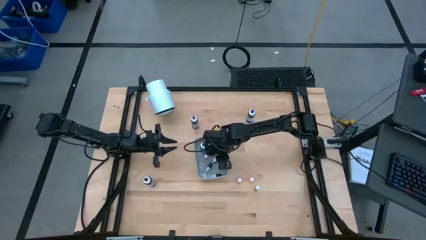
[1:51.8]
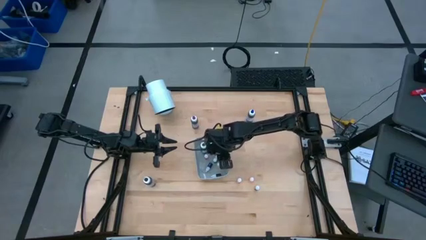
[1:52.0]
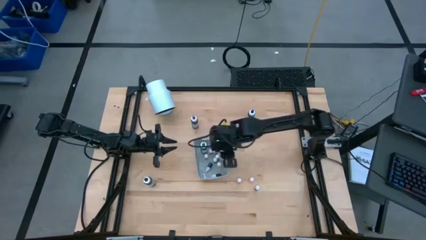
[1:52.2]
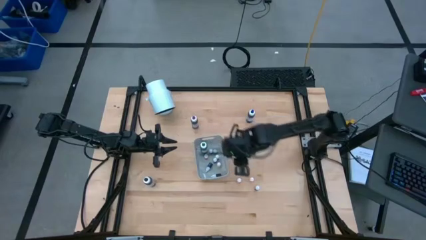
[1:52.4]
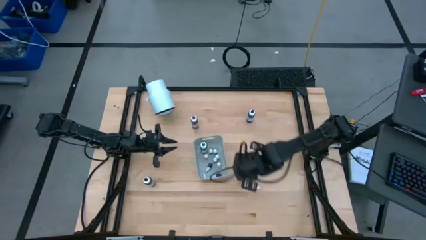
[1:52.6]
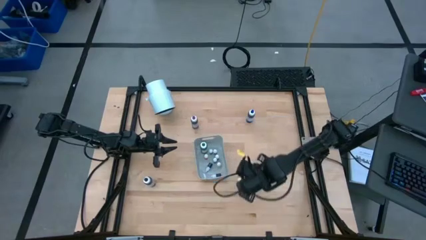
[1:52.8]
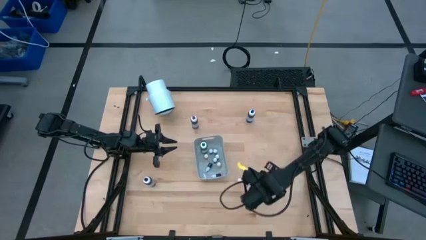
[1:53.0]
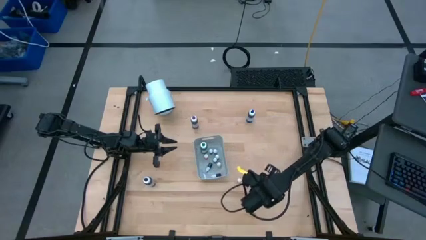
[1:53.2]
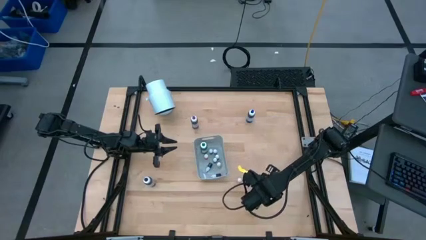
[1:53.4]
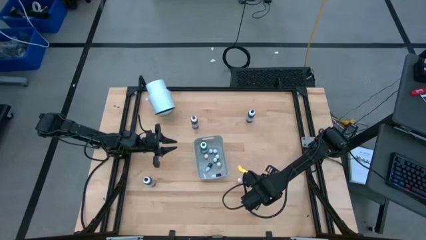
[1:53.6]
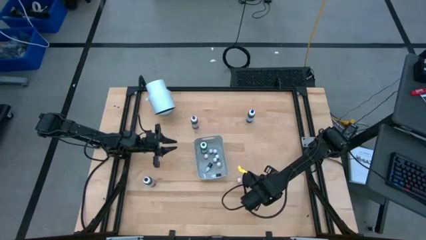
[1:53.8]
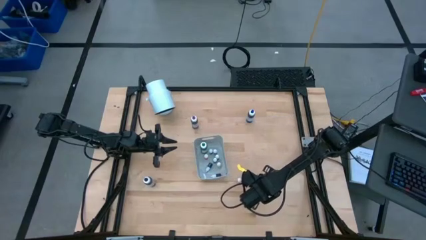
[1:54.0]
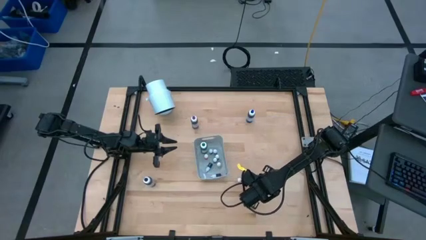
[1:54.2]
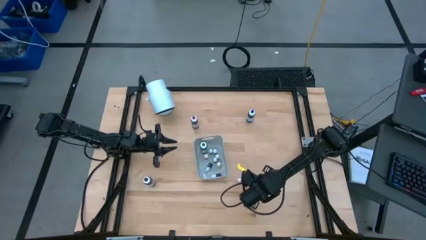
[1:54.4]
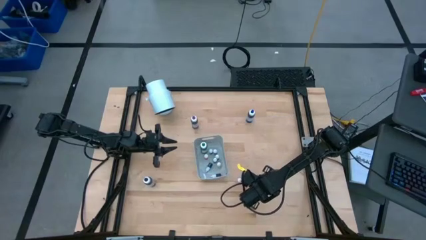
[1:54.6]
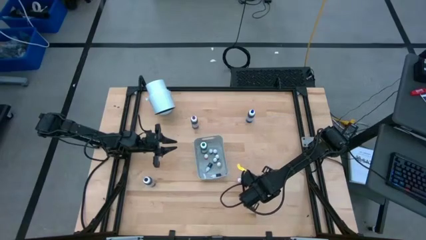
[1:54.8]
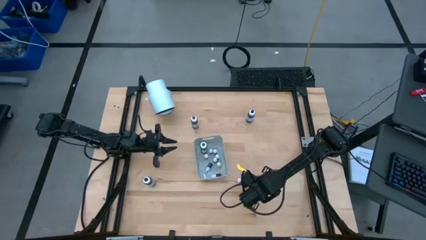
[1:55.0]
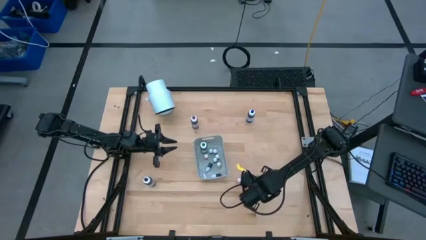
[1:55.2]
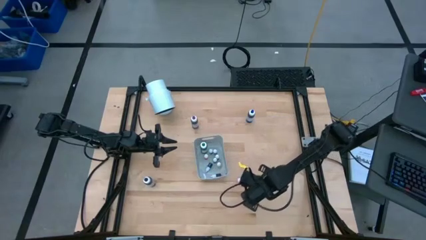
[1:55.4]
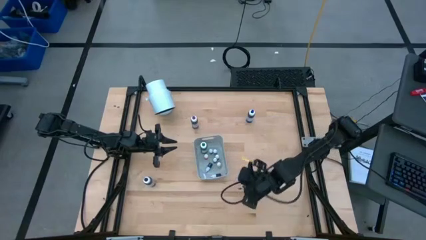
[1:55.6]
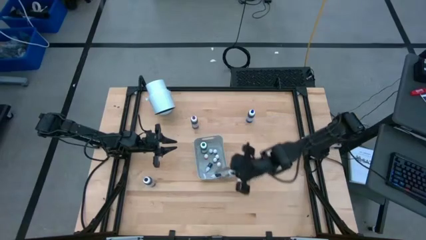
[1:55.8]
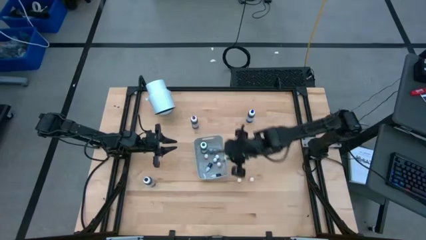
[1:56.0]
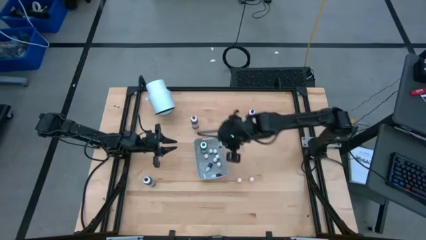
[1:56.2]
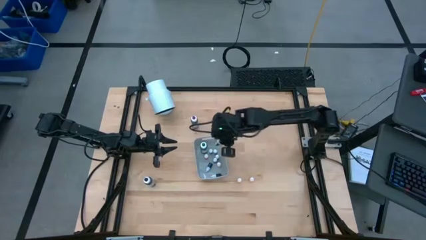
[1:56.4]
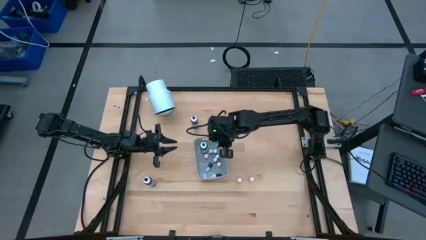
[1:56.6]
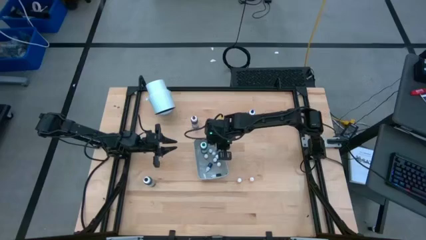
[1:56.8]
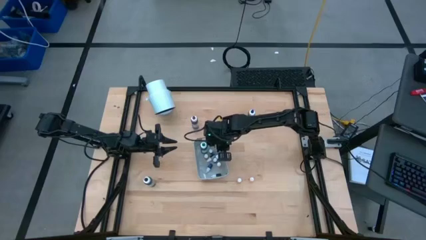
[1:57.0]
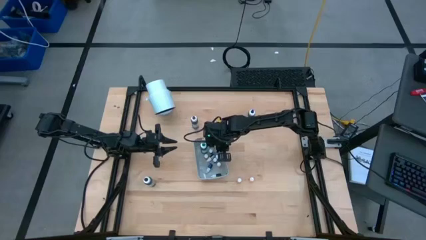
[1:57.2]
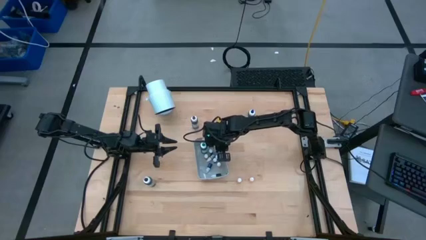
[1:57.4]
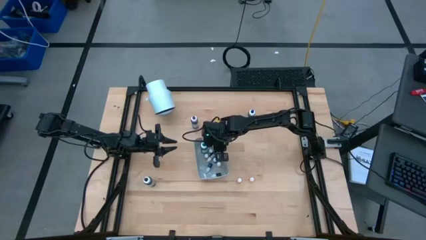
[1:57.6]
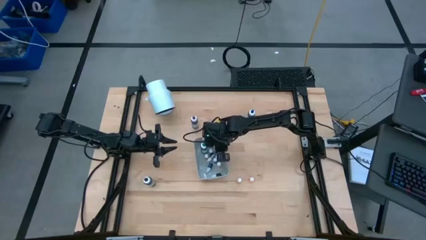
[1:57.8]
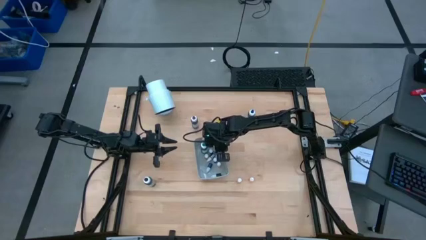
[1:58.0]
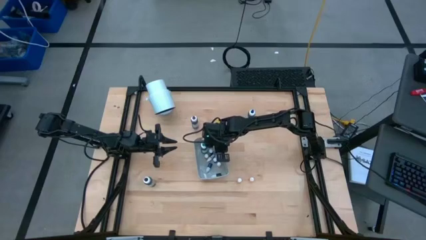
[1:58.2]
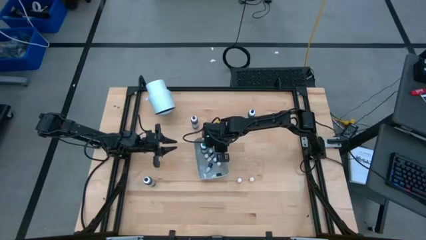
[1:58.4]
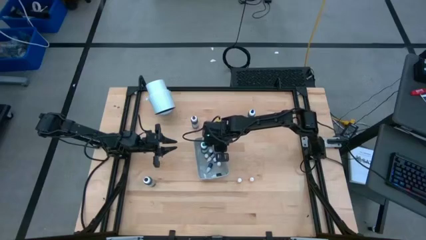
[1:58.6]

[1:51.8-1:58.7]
Task: Pick & Place food coloring
Put the purple food coloring bottle into the bin

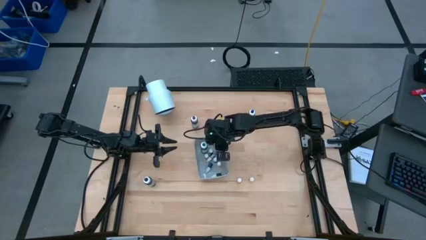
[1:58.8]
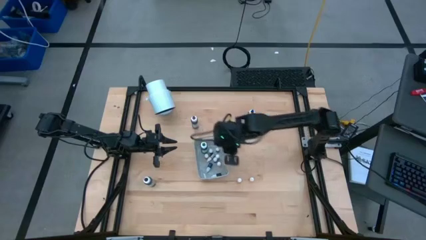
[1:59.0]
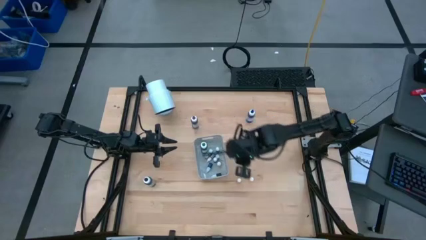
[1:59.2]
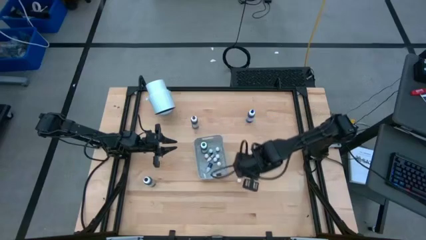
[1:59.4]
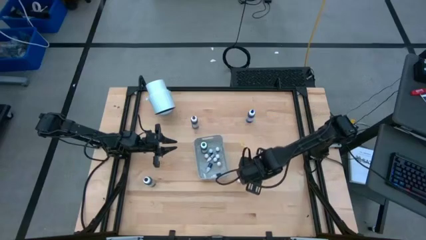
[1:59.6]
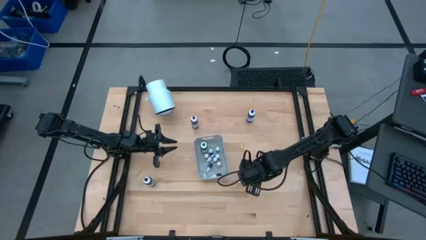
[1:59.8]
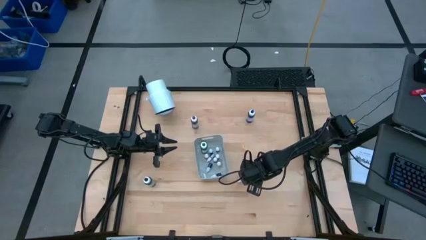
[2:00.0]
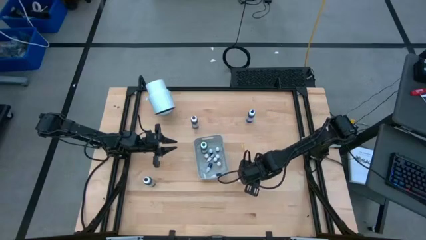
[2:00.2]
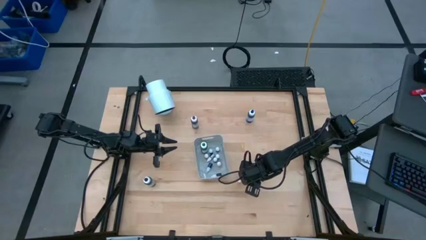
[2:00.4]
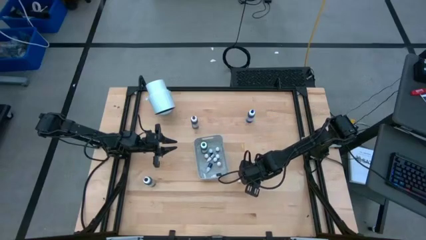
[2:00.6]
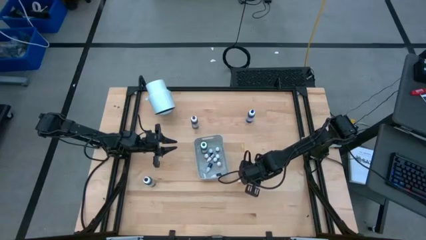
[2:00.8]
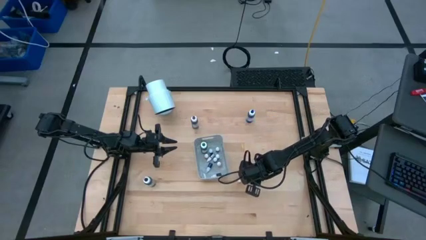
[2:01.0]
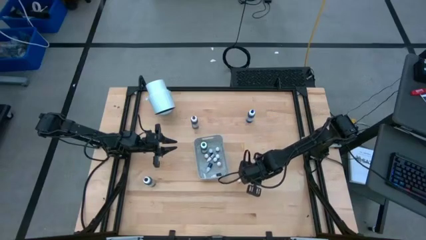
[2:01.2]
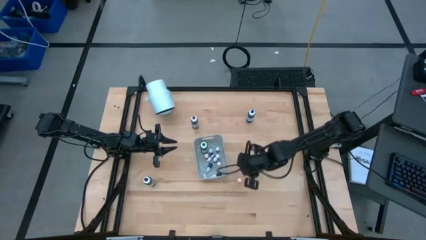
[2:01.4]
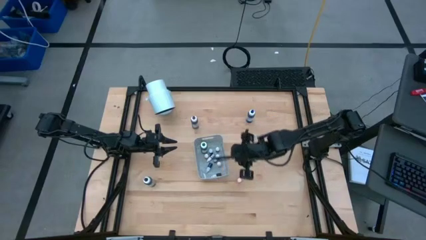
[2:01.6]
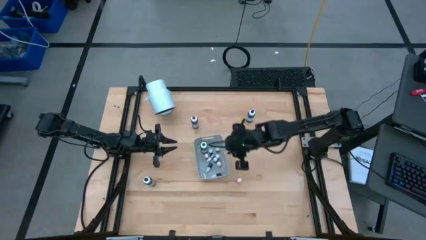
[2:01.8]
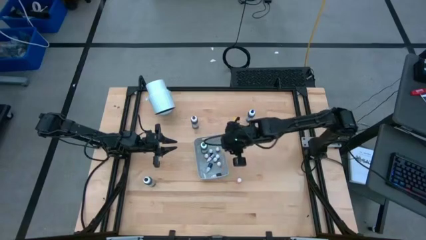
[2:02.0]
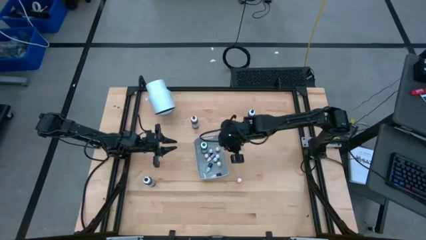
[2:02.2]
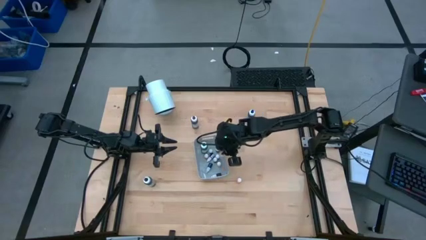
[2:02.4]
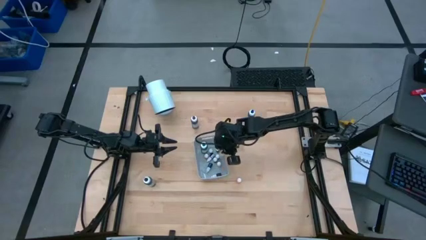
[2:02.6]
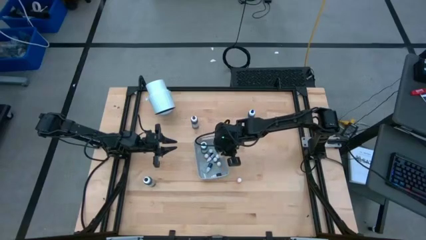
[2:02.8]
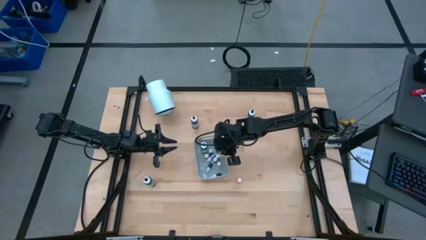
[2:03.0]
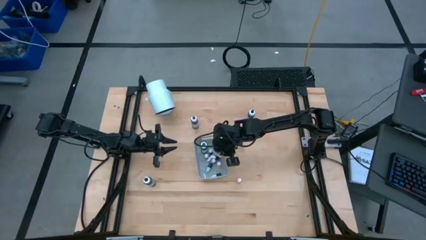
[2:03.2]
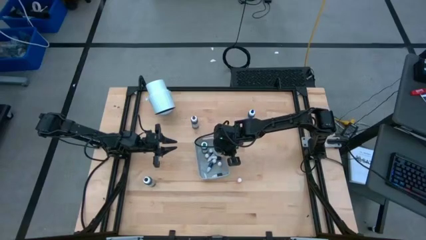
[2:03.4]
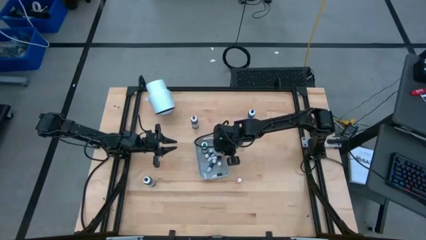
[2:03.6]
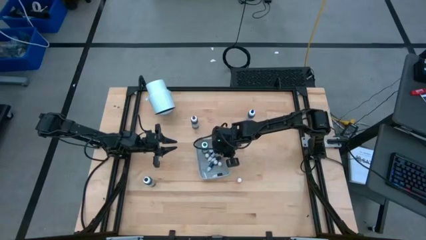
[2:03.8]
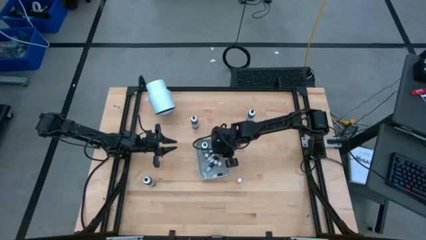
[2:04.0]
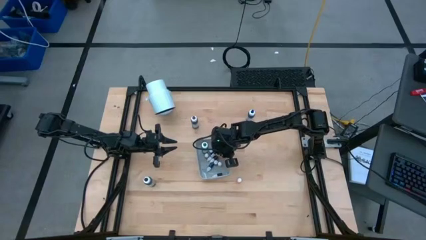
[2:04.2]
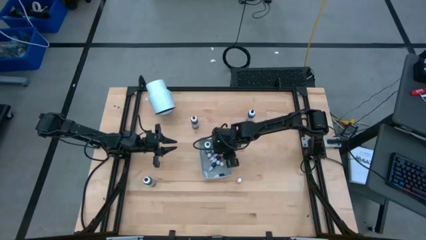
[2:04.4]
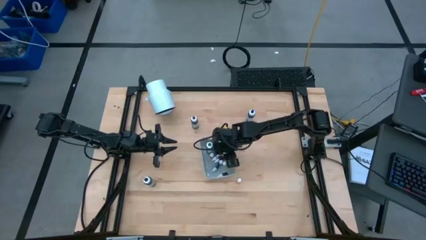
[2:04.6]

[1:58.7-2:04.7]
Put the right yellow food coloring bottle into the bin

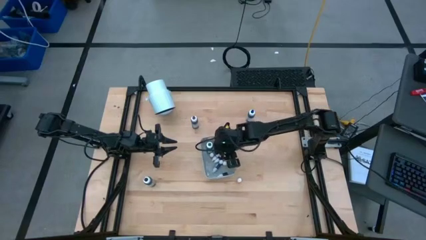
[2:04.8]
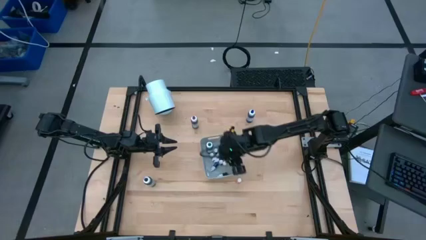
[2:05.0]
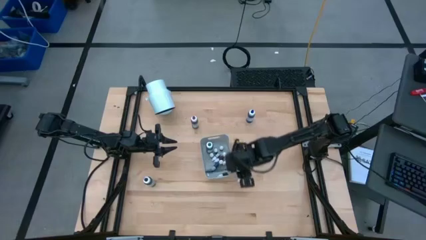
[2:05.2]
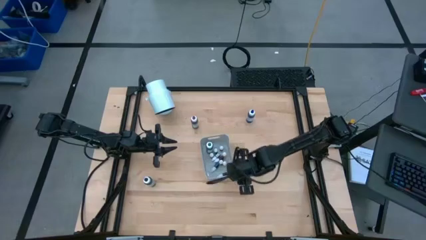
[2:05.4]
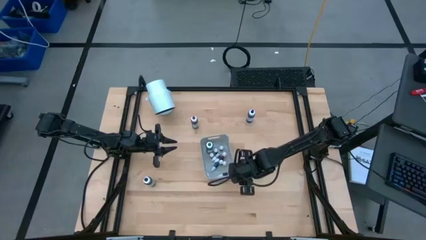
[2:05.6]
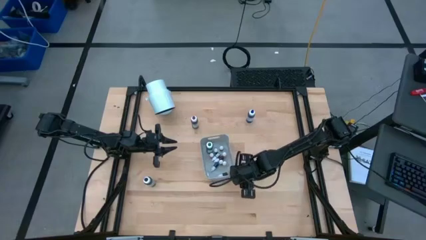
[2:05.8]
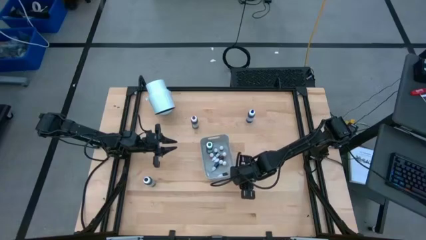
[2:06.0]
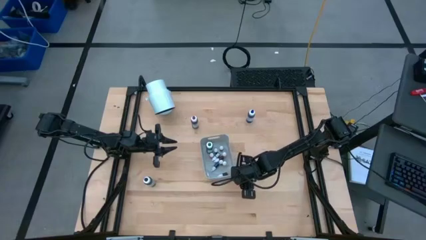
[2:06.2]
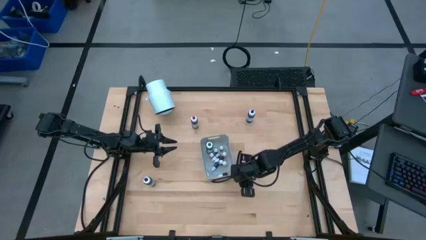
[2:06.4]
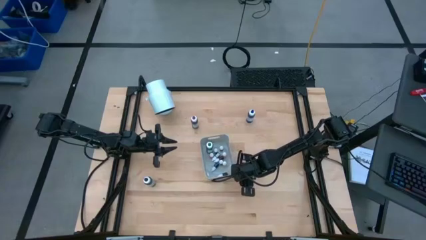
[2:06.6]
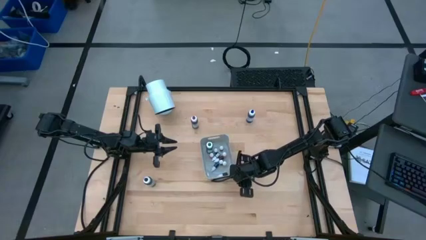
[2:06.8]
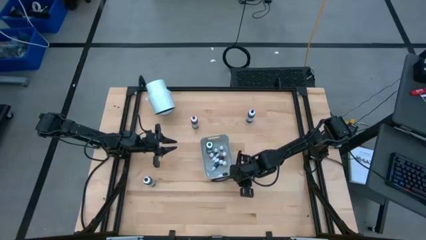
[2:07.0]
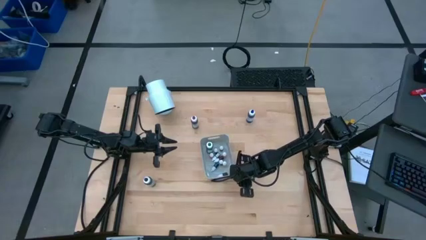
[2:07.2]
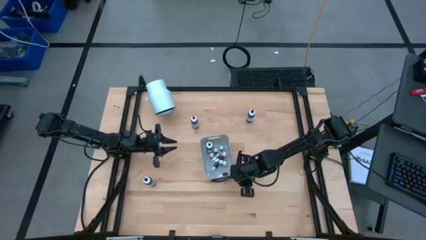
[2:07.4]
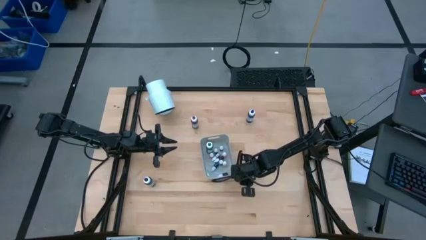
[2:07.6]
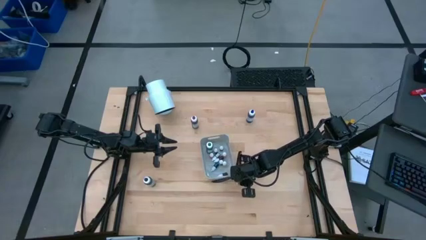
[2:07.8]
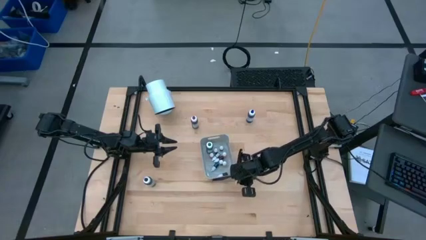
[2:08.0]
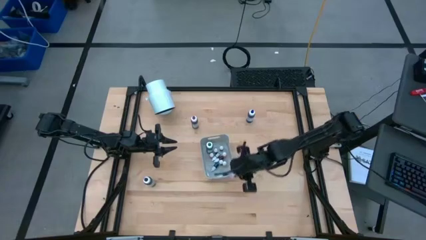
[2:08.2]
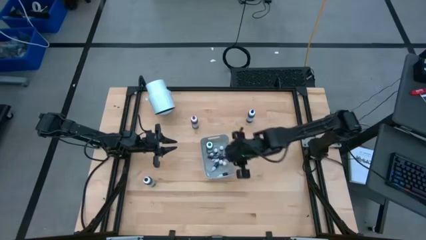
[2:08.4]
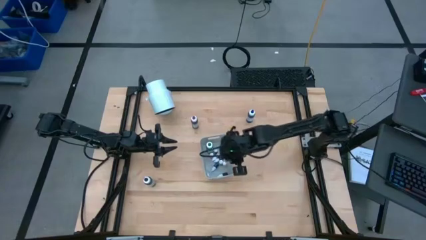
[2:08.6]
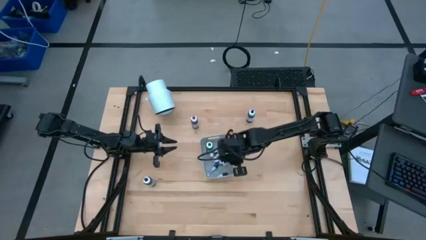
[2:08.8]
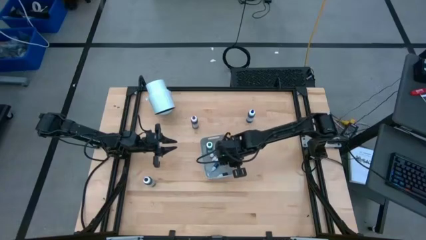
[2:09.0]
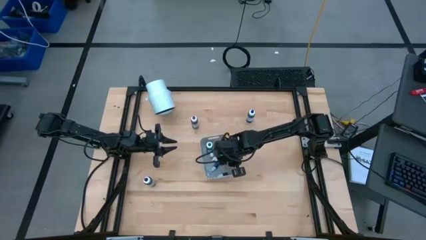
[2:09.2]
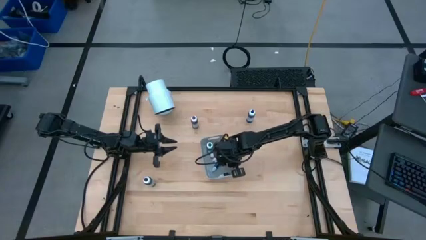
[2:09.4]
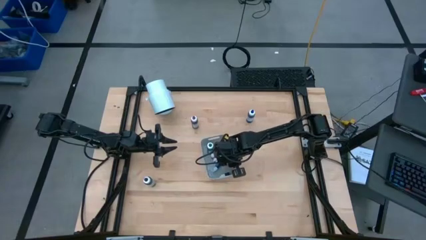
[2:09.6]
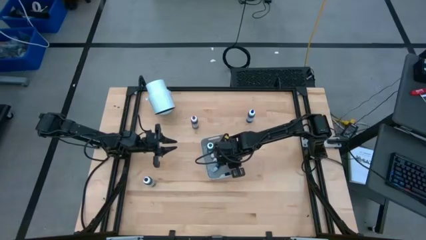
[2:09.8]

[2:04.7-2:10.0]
Put the yellow food coloring bottle into the bin
